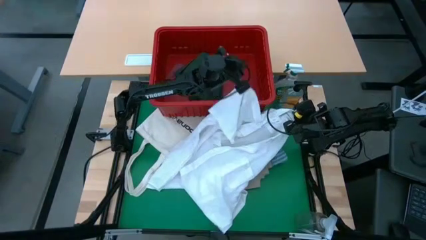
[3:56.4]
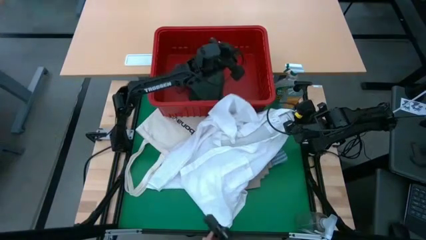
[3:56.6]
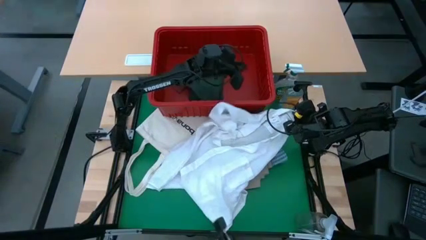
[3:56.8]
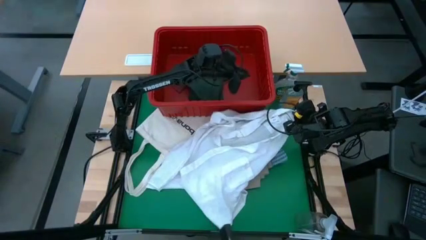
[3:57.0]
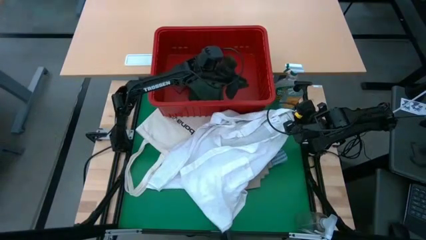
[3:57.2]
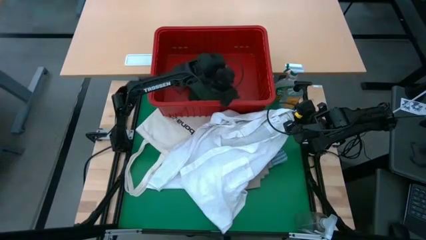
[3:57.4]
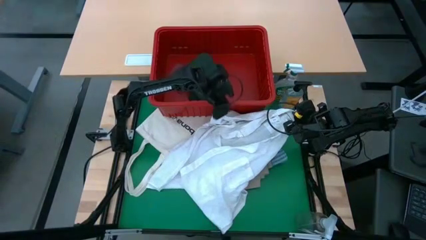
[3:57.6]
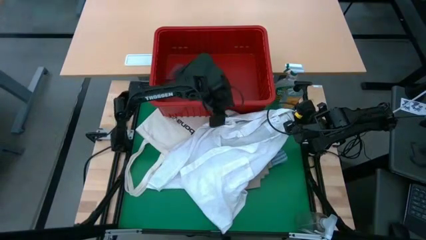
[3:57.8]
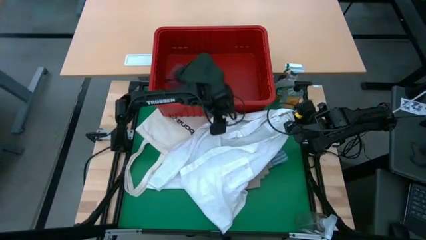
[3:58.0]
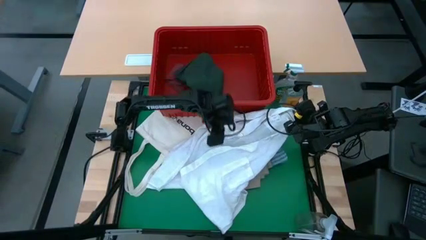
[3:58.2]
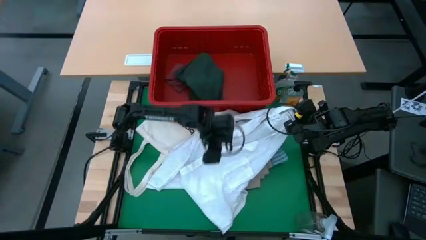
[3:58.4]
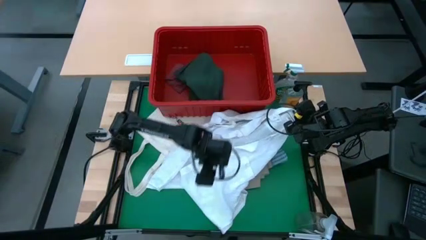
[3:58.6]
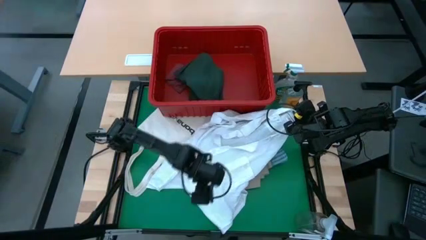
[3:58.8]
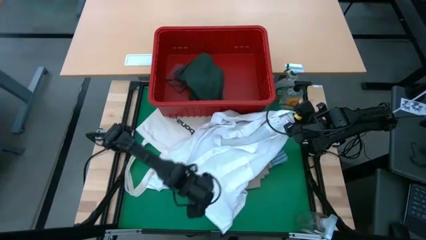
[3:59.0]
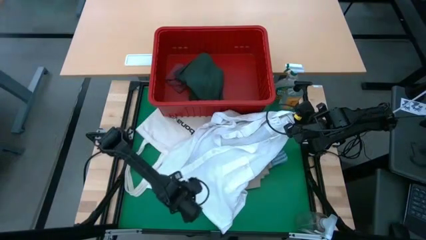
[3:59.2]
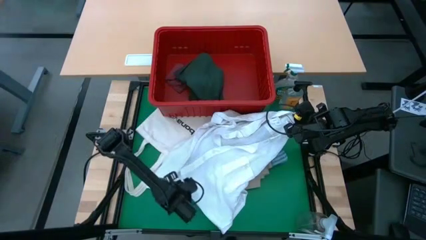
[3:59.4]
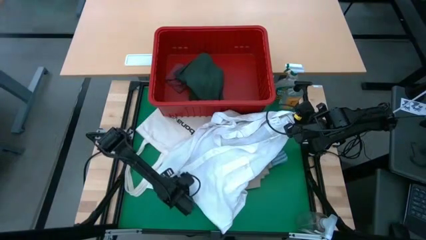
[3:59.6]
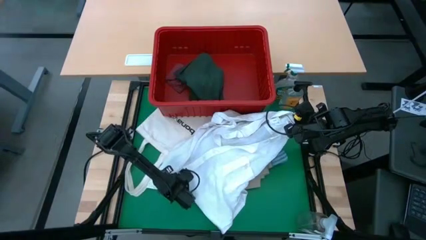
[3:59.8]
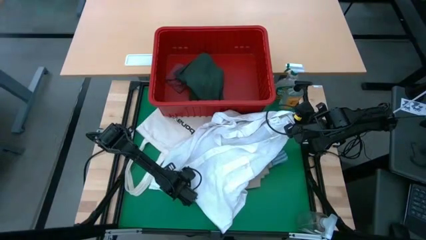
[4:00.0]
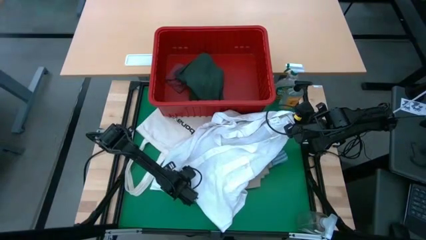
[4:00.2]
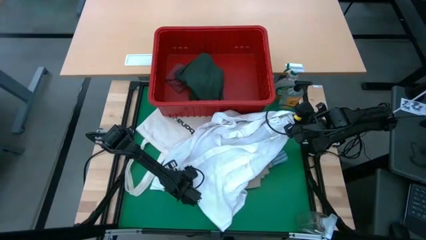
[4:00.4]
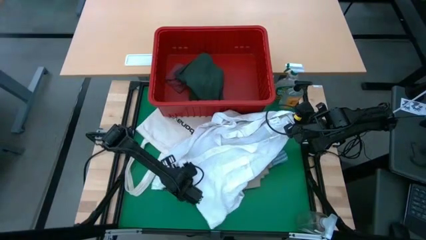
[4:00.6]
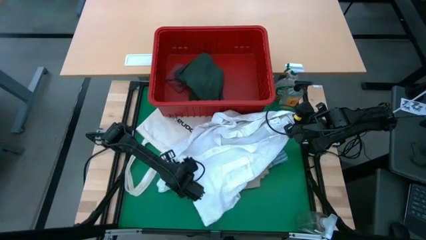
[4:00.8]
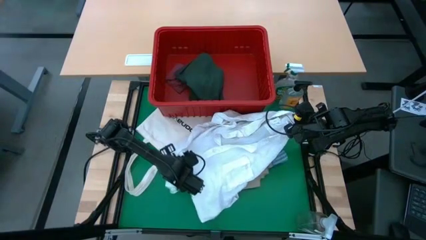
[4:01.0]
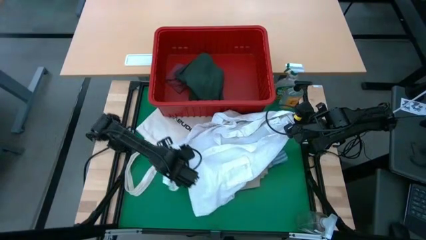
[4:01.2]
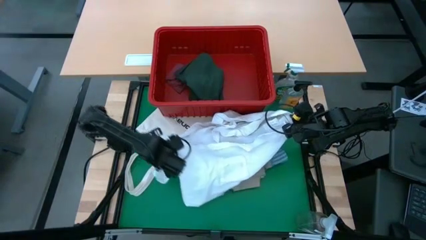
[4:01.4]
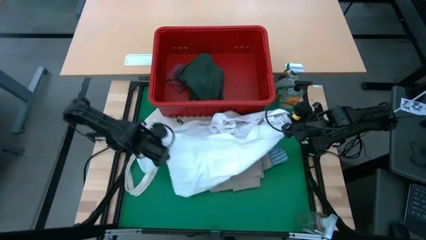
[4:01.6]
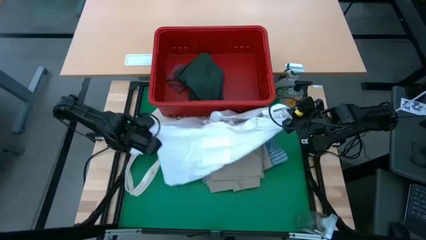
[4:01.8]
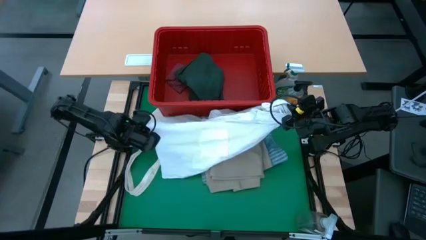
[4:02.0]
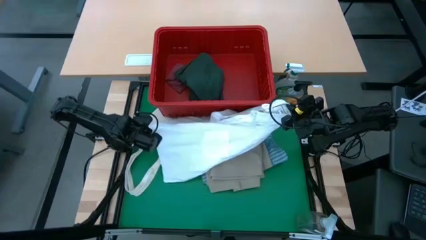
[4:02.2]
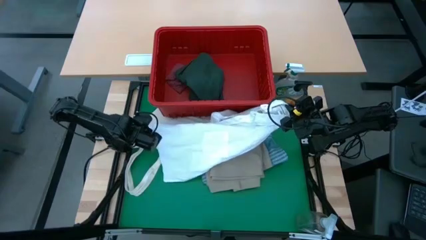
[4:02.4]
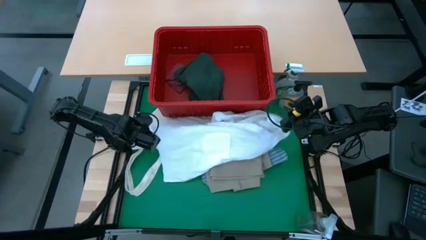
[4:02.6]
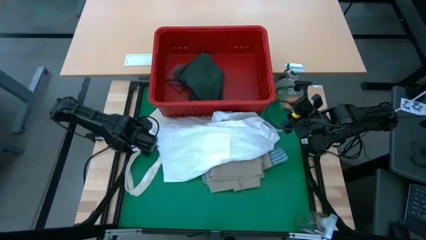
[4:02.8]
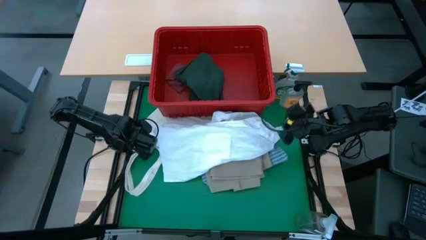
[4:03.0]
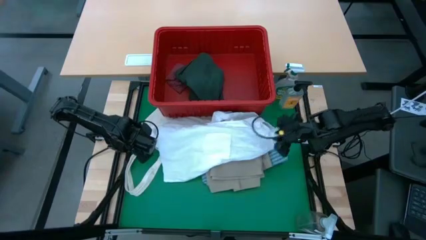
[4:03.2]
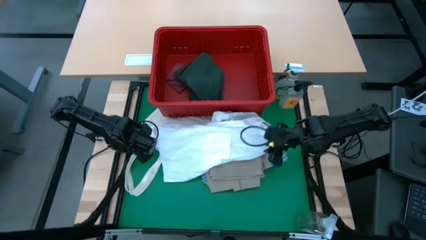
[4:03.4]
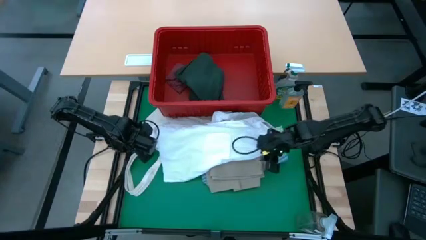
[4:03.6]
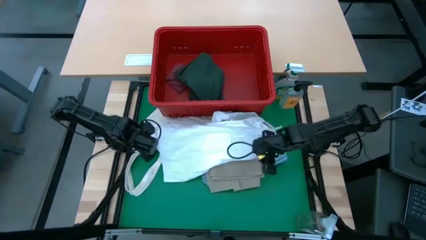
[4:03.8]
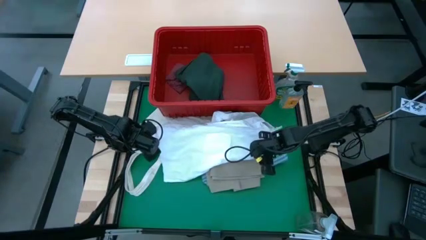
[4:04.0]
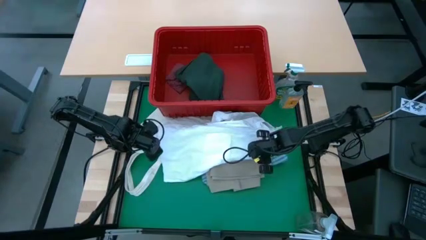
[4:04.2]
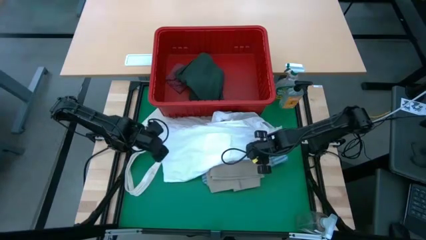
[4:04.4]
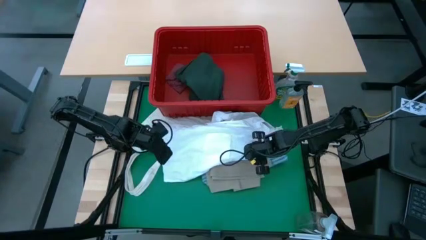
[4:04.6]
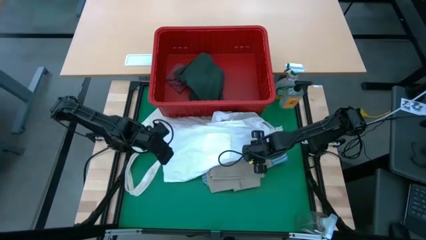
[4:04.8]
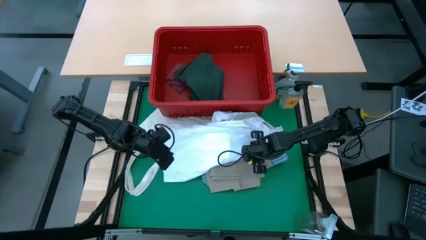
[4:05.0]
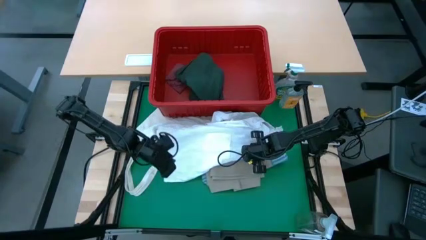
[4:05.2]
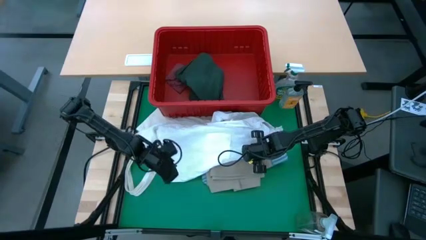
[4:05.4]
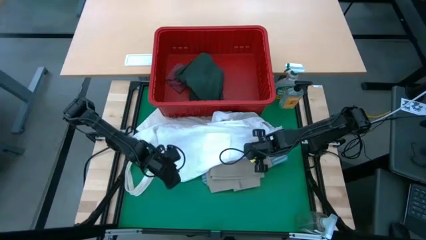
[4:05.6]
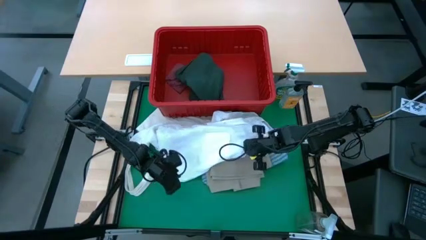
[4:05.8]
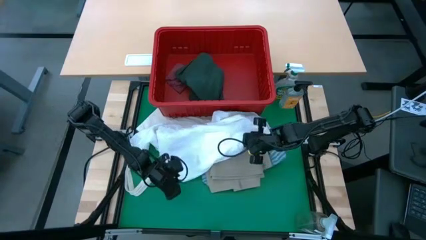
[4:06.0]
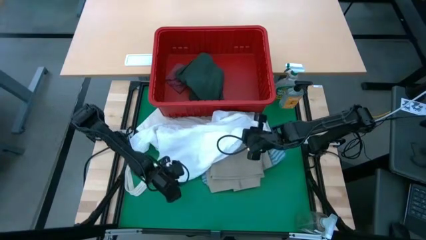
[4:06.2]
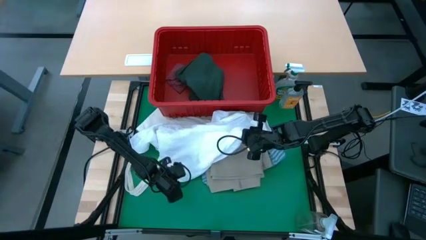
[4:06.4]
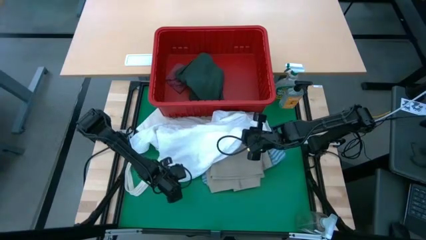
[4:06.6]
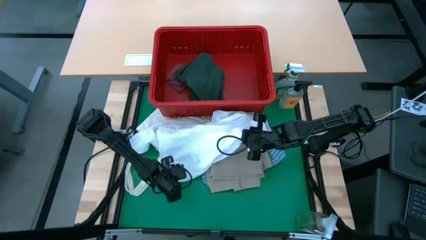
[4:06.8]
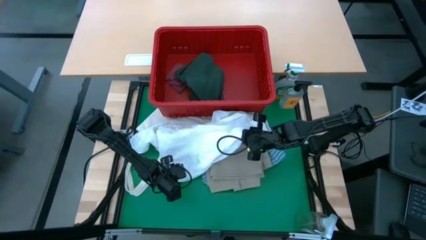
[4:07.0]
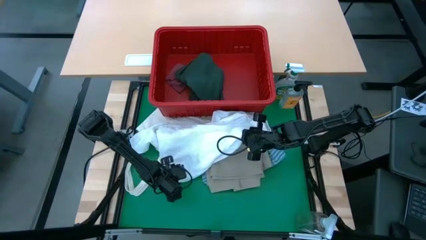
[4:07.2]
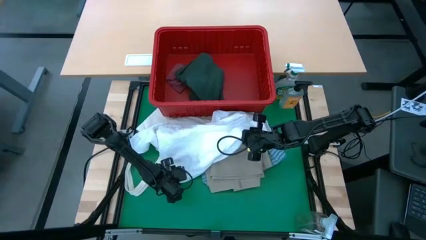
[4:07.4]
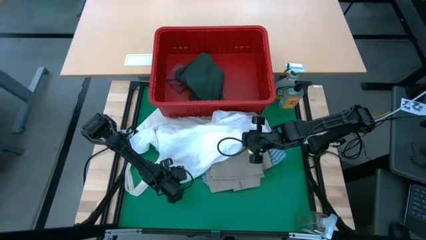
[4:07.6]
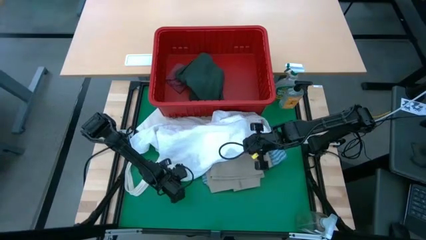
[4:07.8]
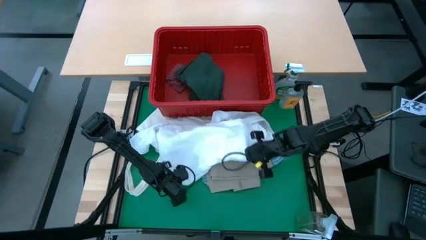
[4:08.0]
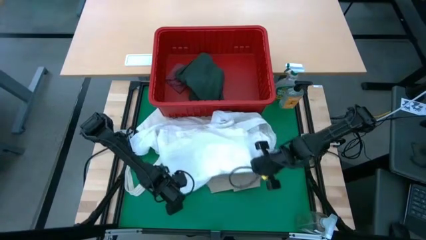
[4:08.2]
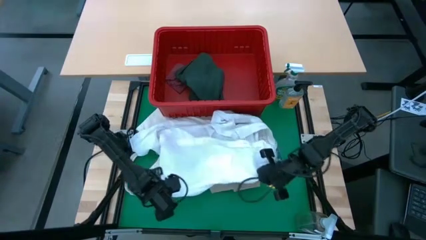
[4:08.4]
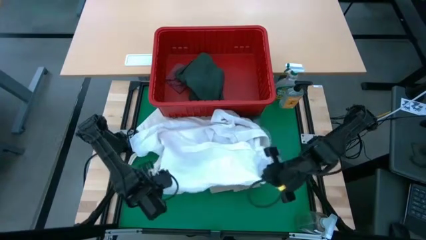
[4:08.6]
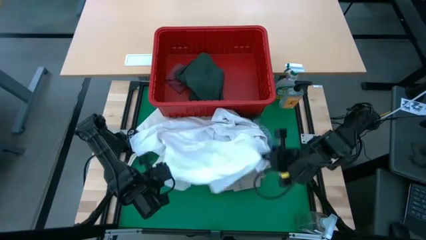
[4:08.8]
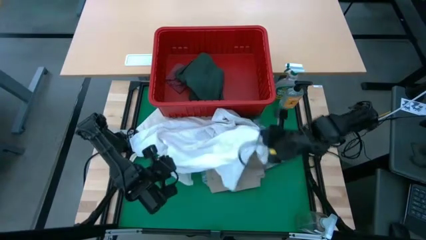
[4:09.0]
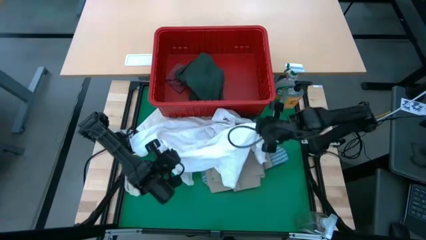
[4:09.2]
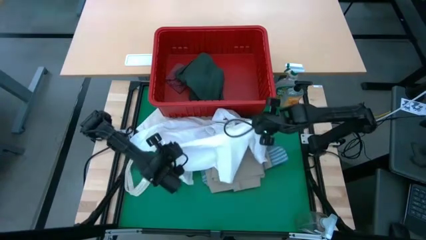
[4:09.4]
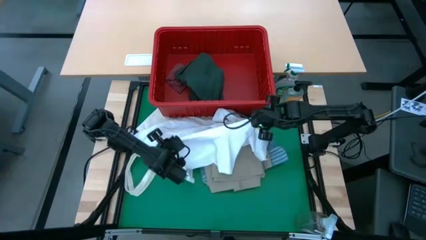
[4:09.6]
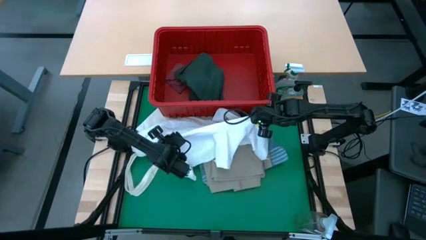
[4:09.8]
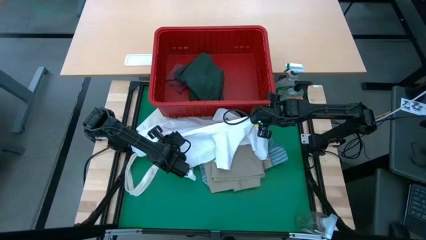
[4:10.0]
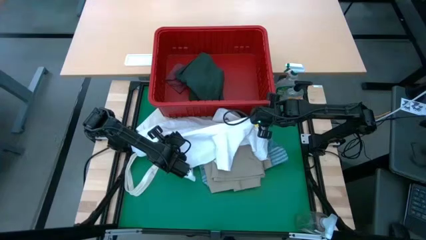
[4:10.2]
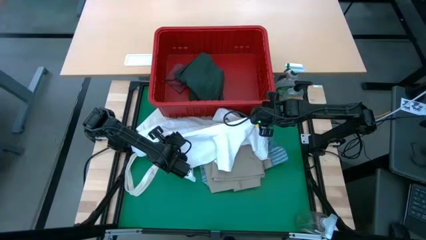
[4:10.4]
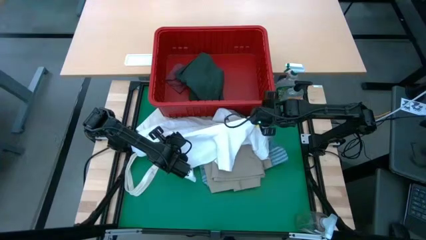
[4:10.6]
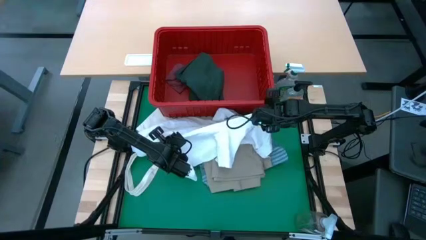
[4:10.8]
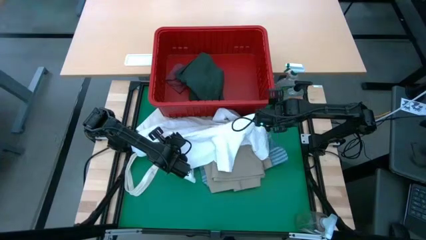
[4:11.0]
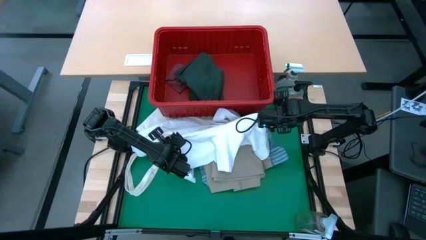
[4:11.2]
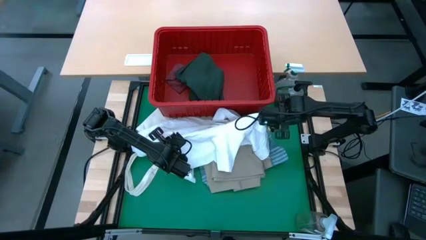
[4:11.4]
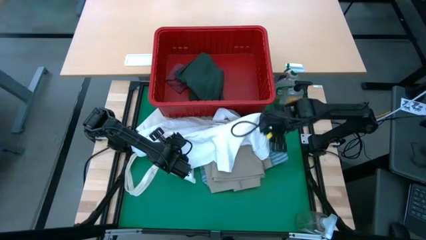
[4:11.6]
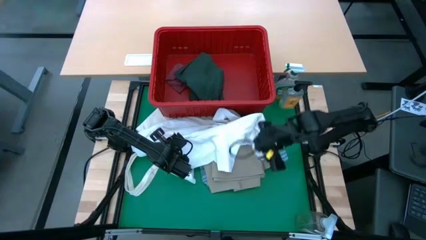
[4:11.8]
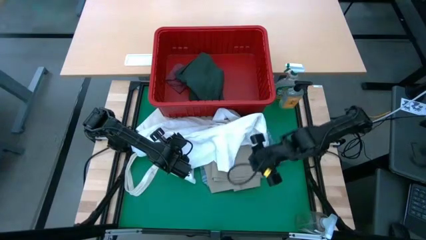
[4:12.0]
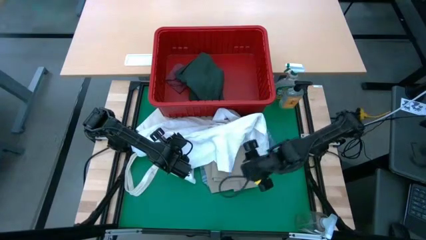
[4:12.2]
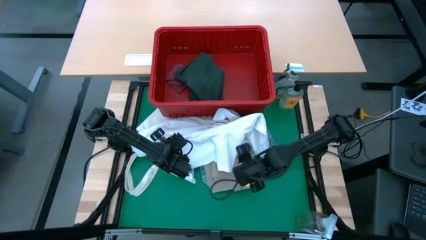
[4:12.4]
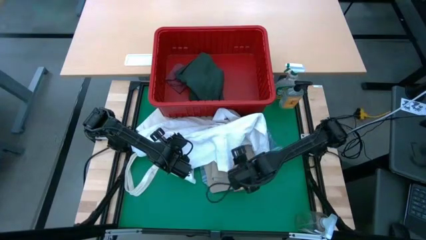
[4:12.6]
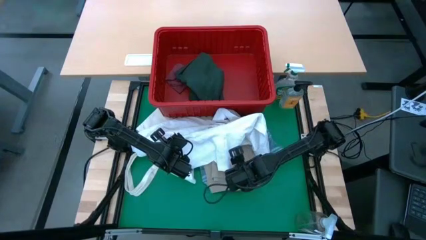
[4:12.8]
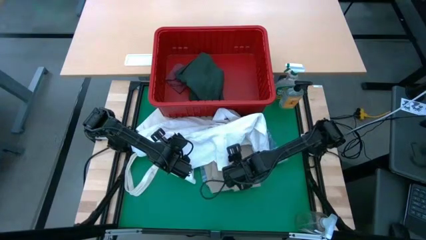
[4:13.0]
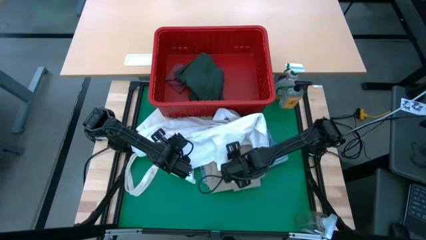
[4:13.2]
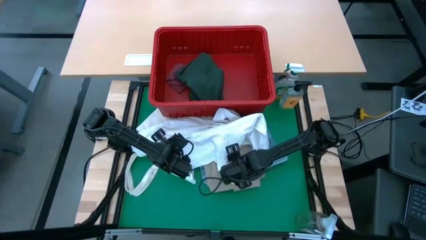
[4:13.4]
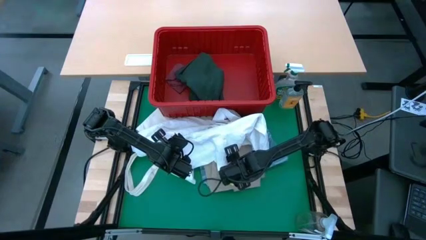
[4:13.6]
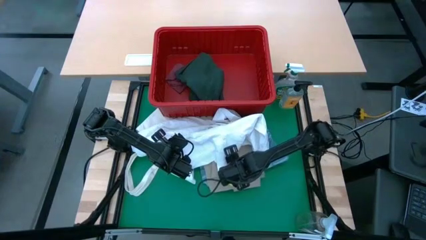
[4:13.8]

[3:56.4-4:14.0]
Task: Fold Laundry from Bin
Fold the white polo shirt
